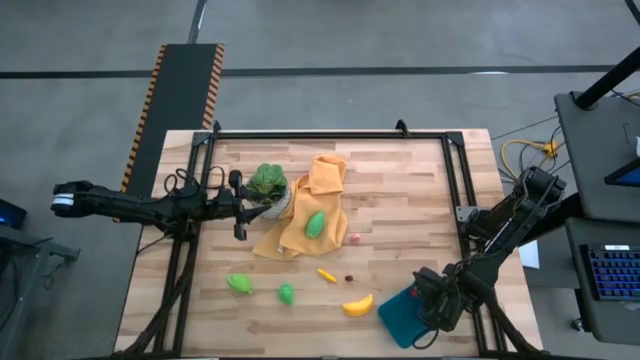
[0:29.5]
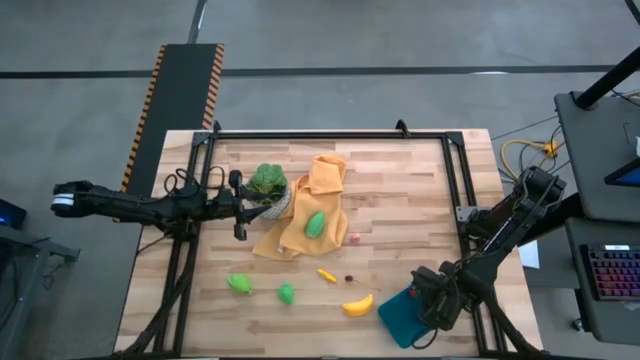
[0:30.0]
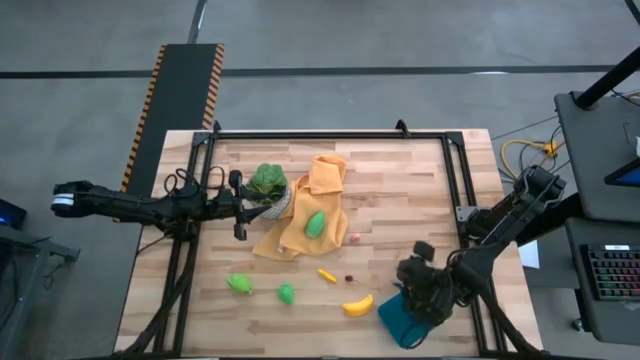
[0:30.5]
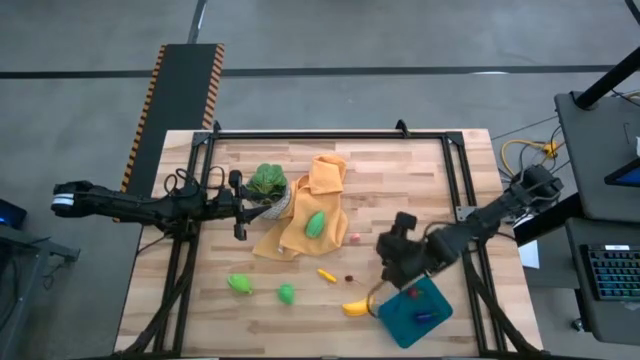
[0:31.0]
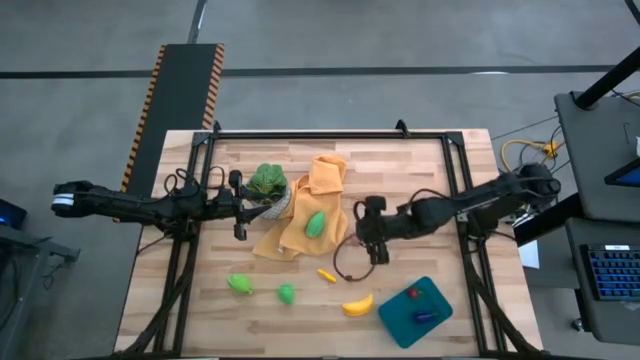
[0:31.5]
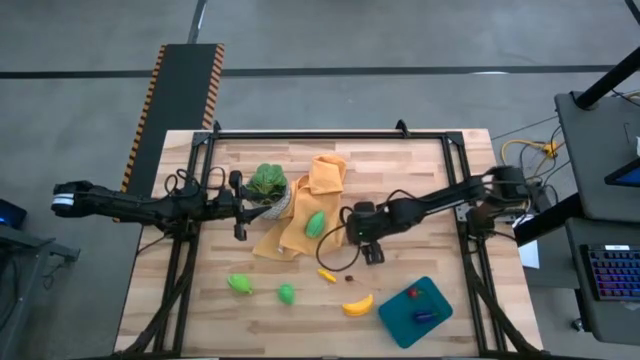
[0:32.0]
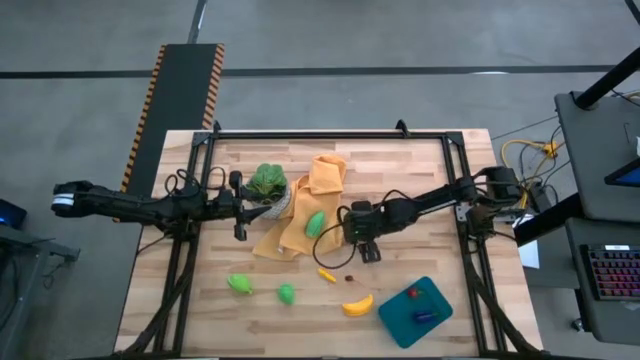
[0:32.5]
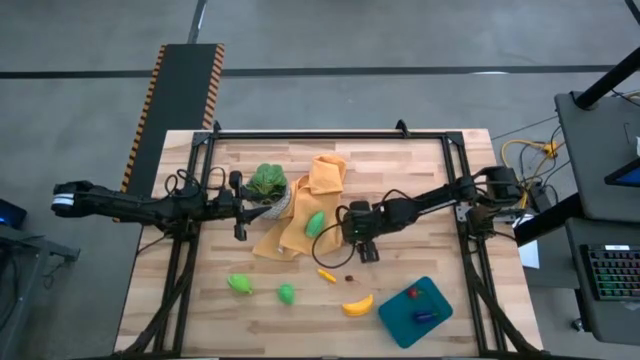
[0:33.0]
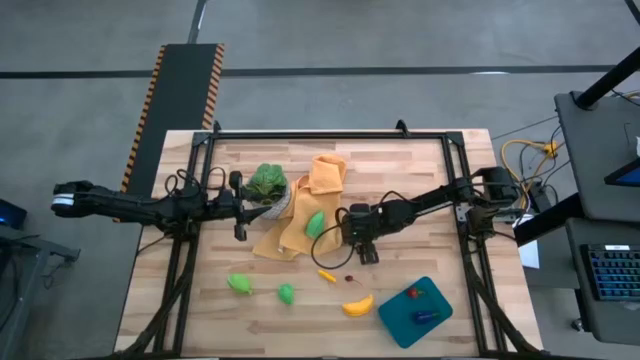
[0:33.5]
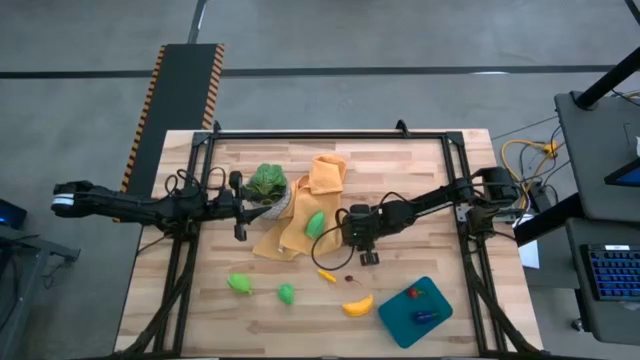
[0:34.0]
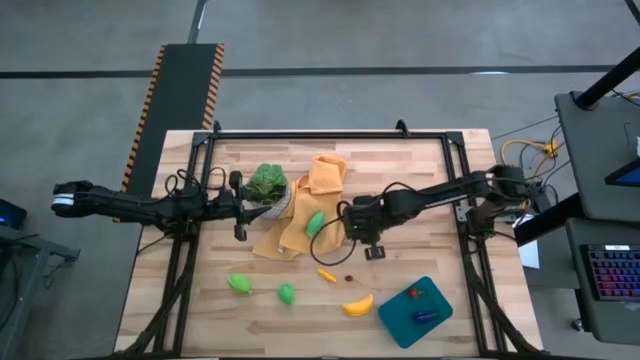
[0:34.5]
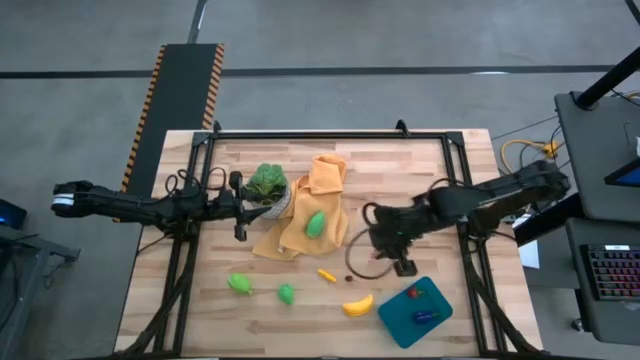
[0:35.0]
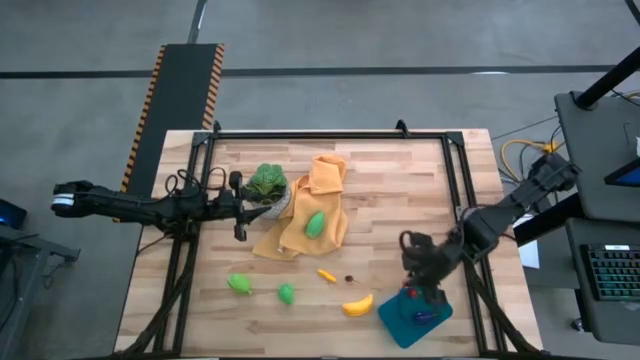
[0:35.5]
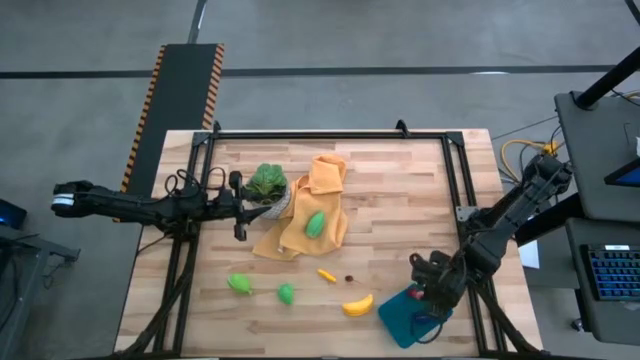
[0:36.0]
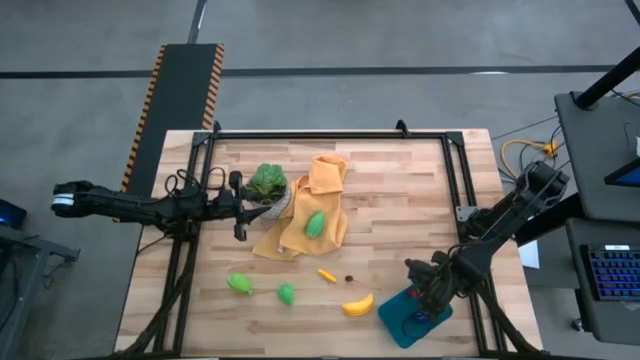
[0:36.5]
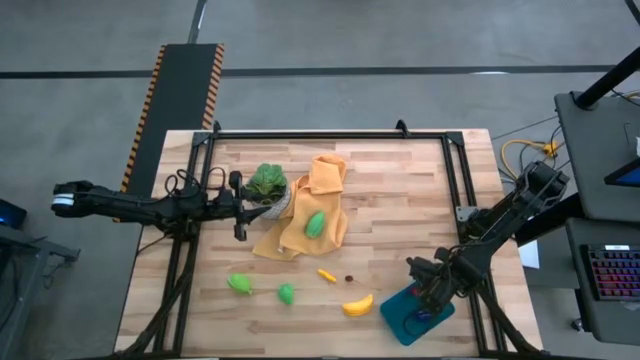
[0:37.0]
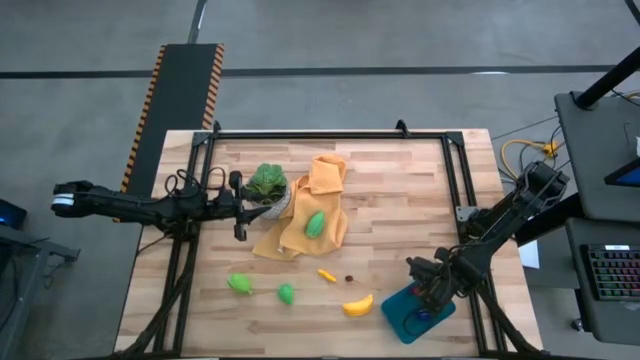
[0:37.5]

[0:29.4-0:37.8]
Task: Pick and placing Produce into tupperware
Put the apricot into the blue bin

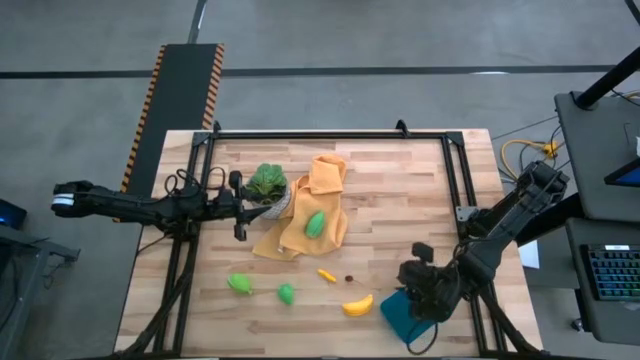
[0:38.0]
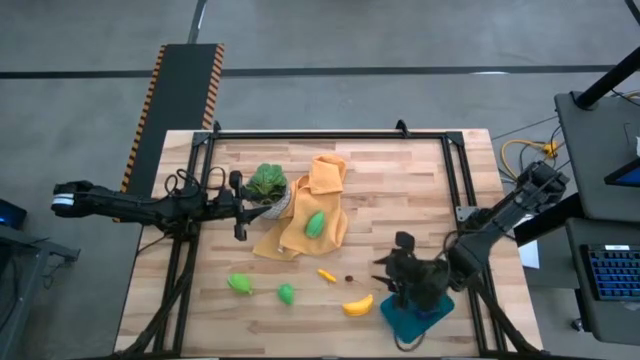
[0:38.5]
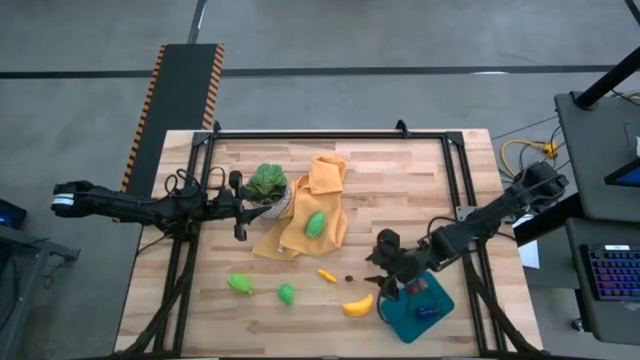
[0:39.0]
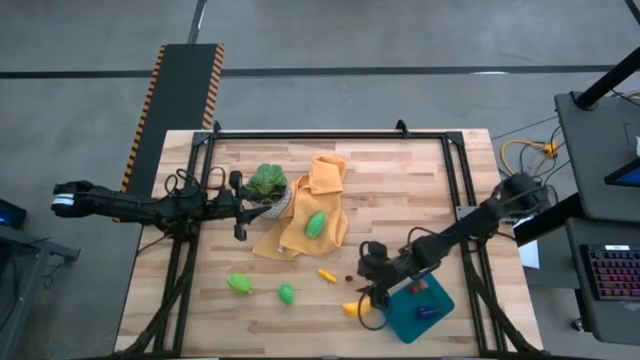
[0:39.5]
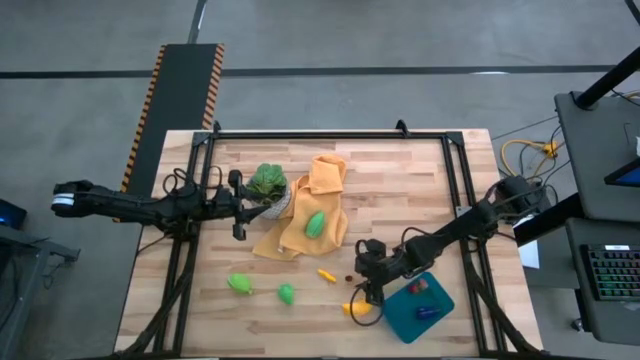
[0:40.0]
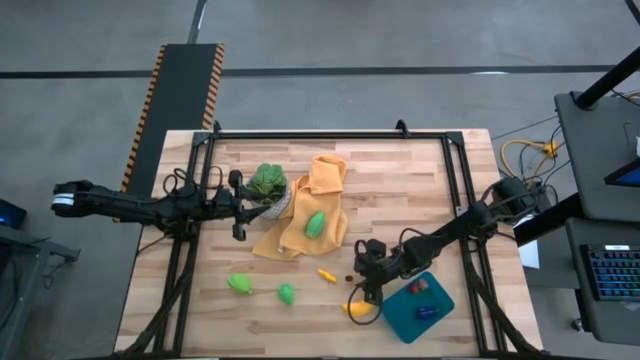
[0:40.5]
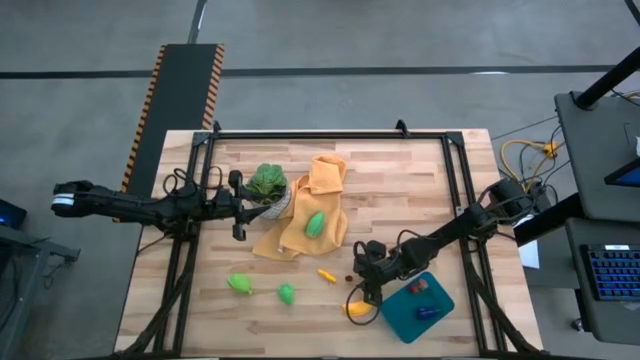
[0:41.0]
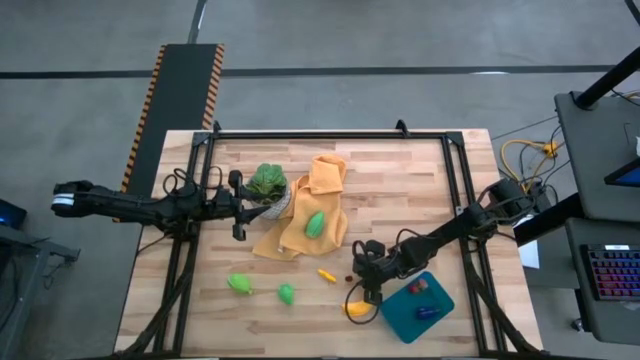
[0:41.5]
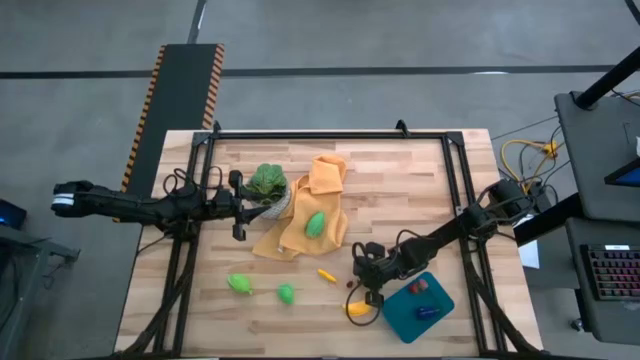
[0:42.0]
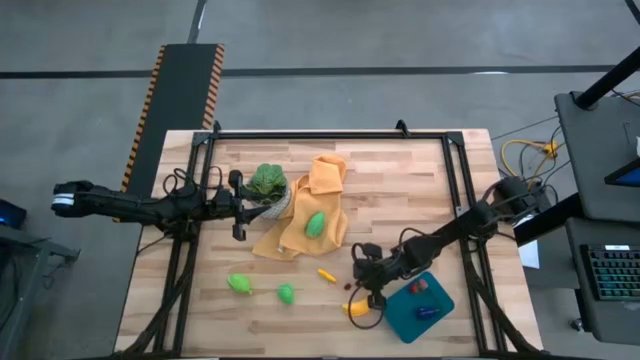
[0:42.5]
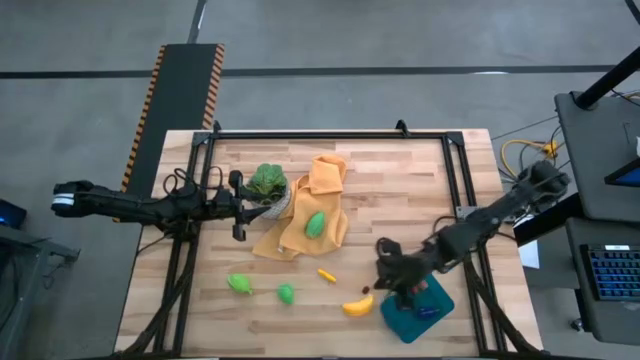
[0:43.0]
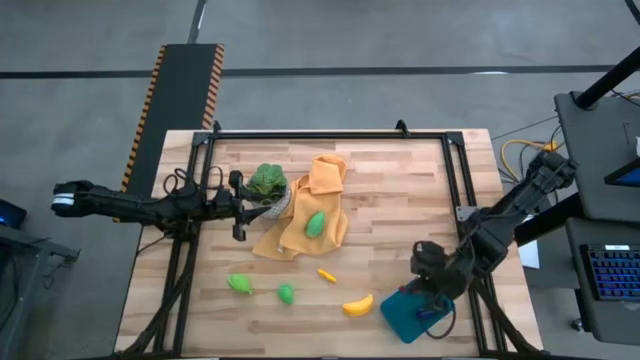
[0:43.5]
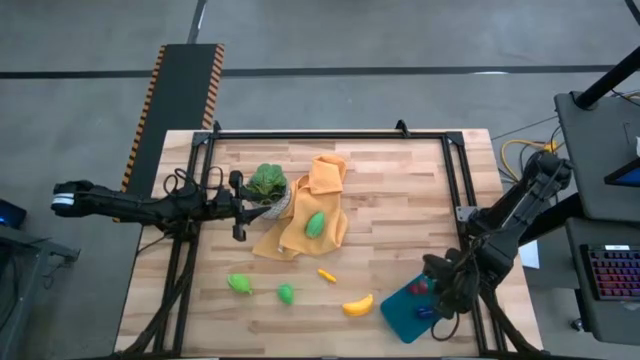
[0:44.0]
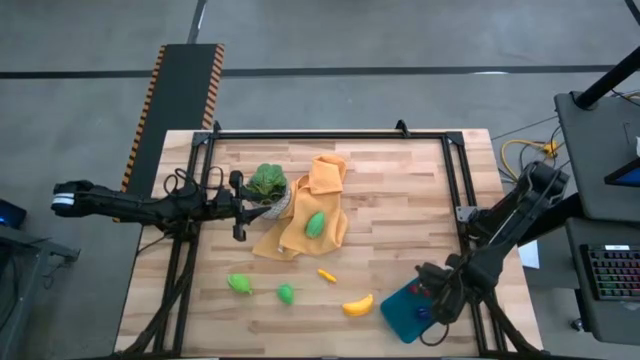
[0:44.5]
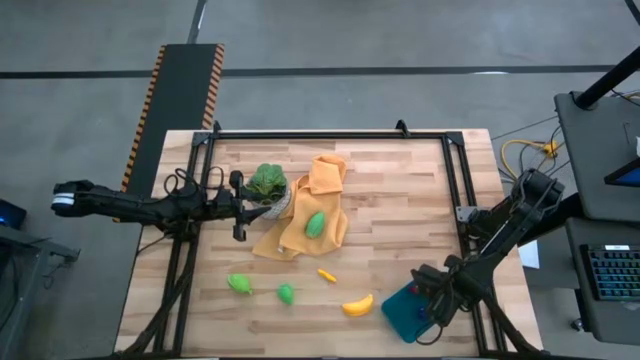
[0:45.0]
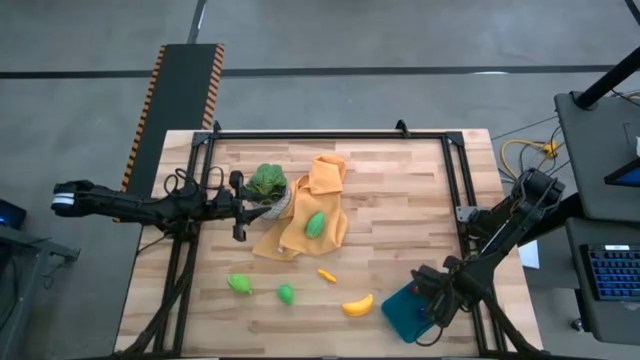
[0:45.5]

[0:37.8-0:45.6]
Put the cherry into the blue bin

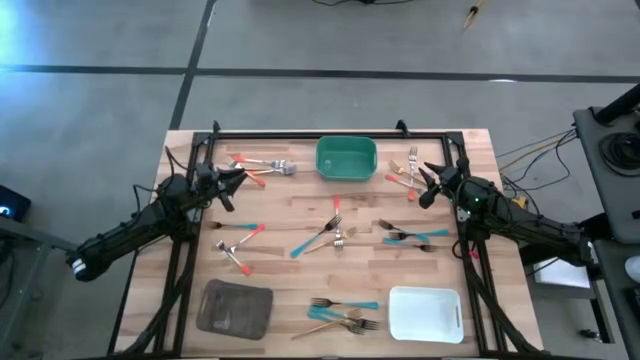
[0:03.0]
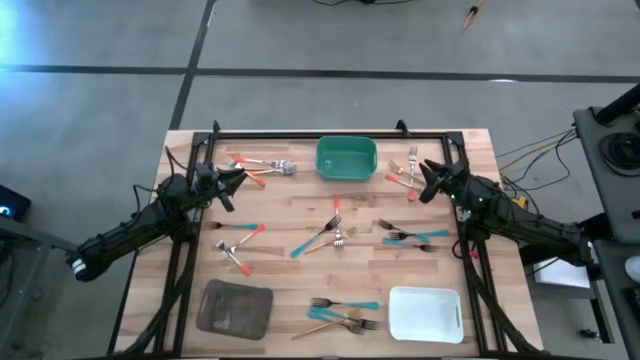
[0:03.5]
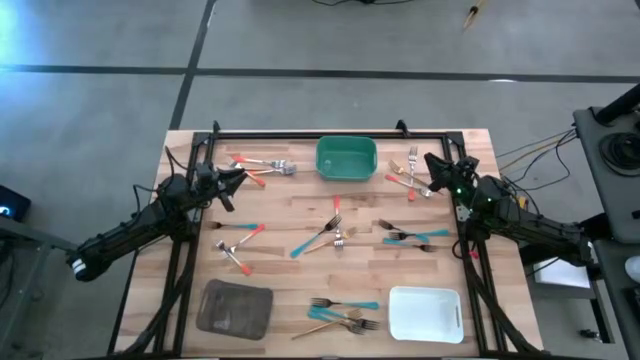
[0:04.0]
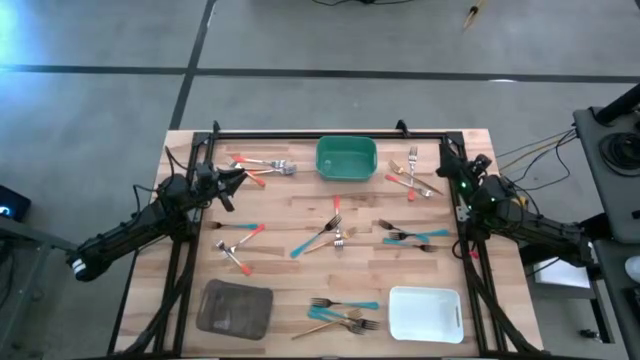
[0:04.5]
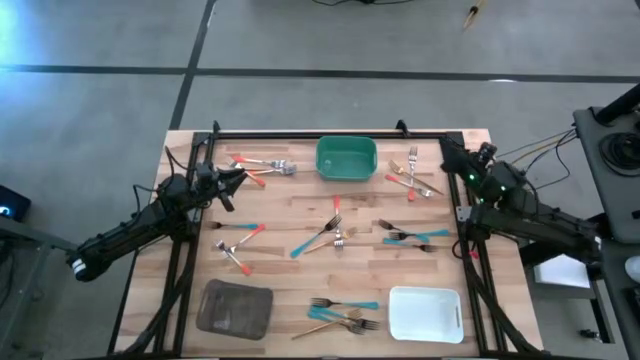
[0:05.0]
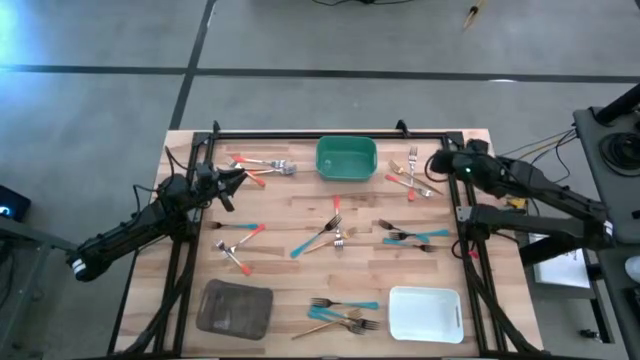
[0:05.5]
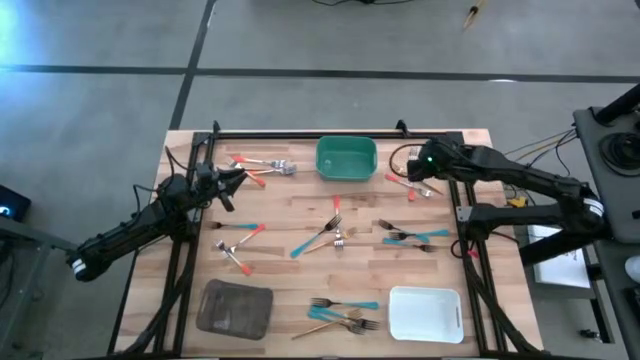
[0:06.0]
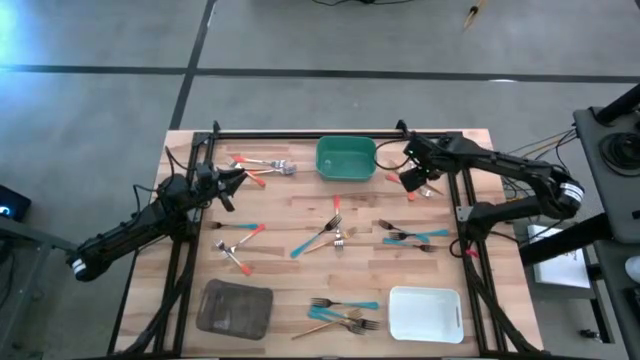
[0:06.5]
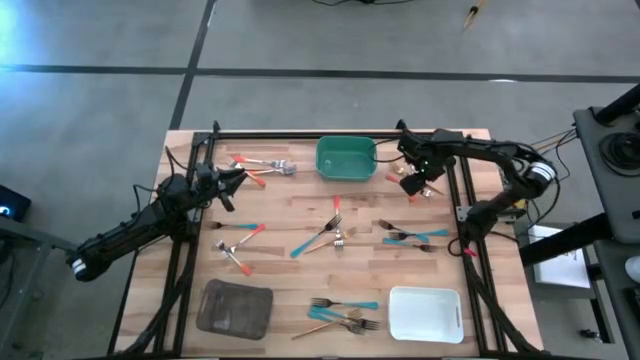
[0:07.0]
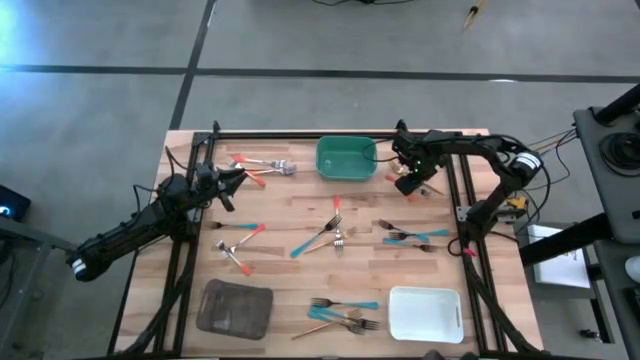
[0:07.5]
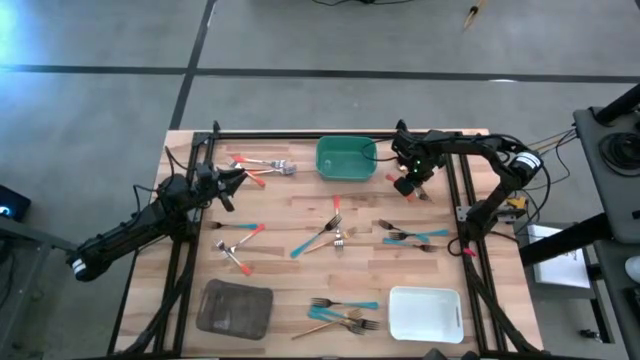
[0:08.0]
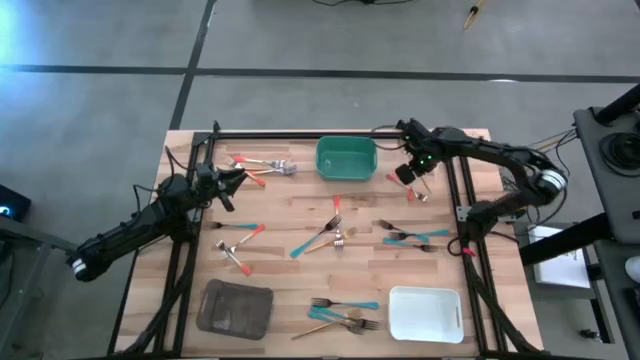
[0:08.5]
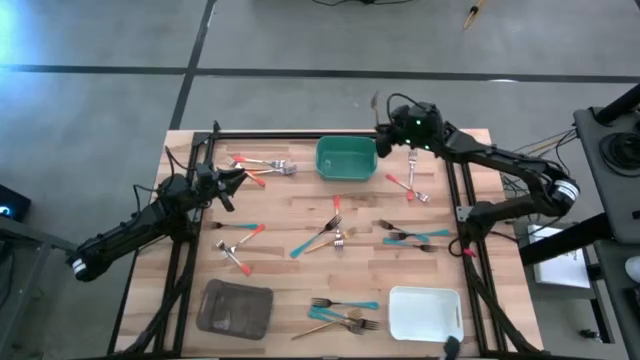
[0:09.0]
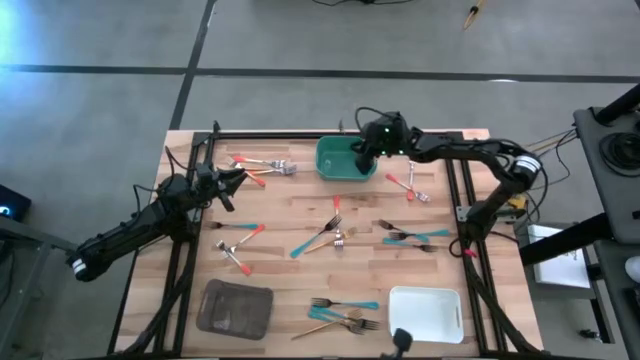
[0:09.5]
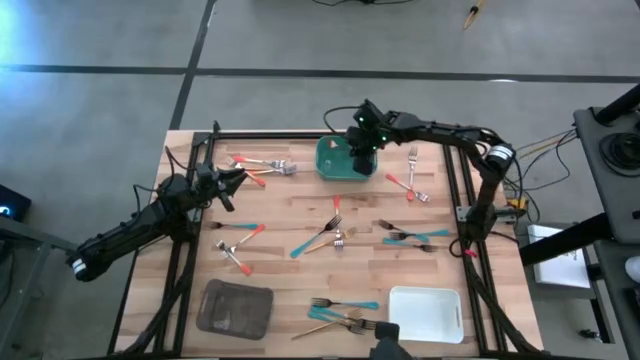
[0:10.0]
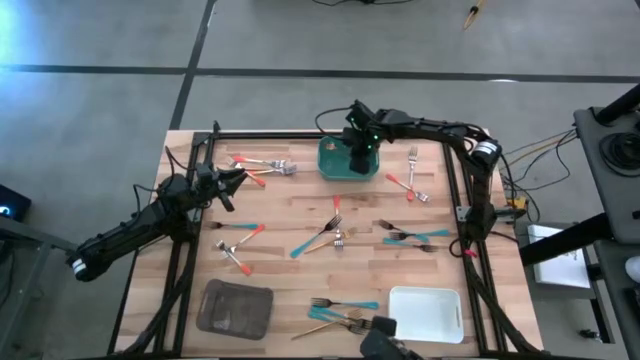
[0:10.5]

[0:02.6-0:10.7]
Task: Sort silverware by color (type)
Put the gold fork into the blue bin
